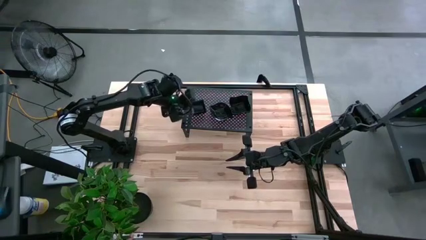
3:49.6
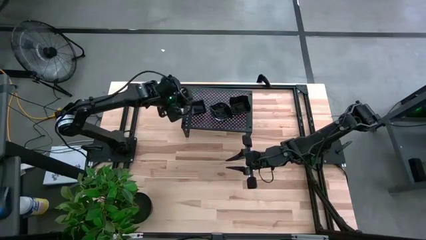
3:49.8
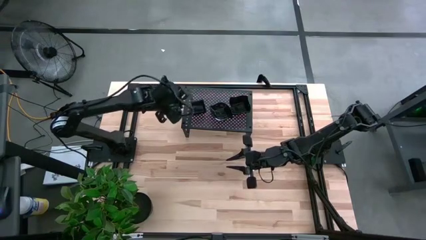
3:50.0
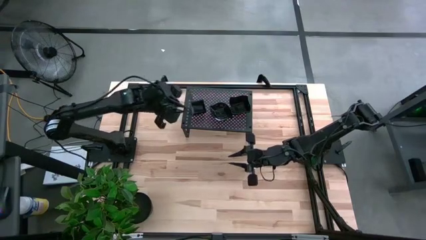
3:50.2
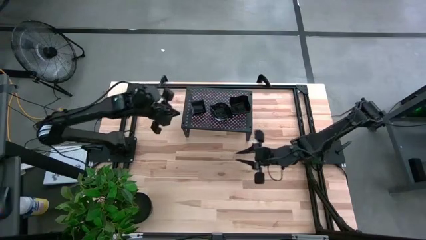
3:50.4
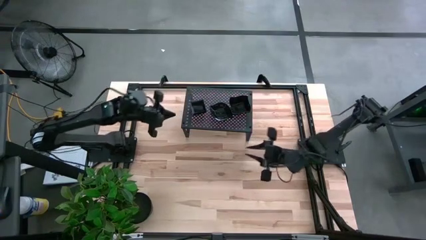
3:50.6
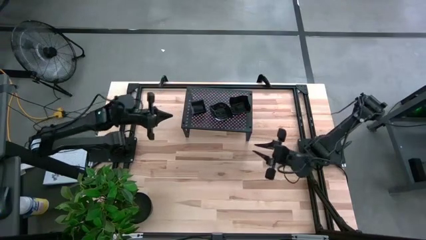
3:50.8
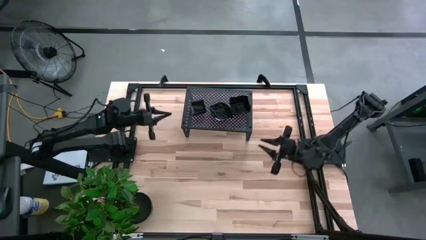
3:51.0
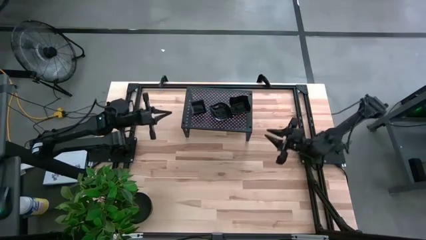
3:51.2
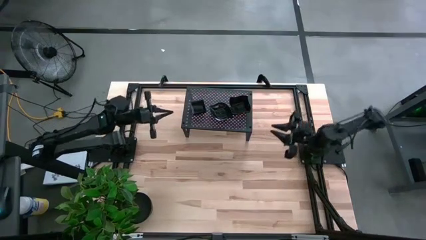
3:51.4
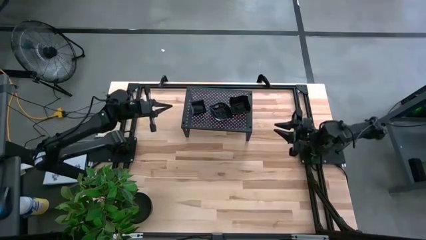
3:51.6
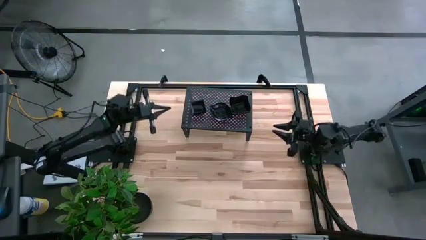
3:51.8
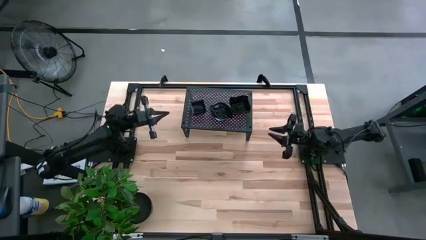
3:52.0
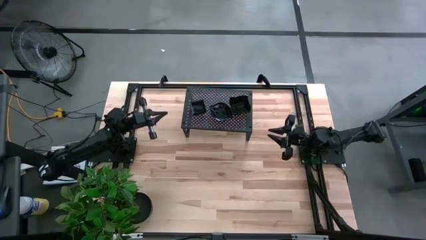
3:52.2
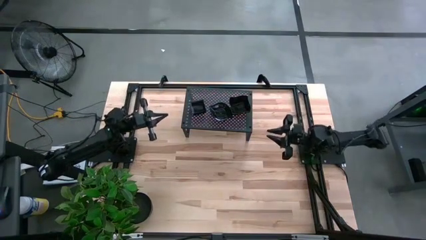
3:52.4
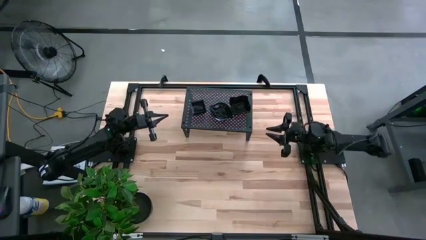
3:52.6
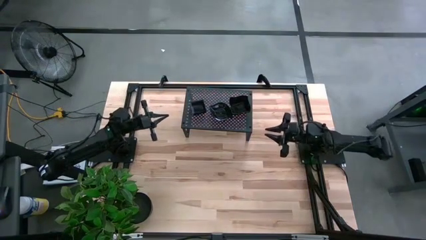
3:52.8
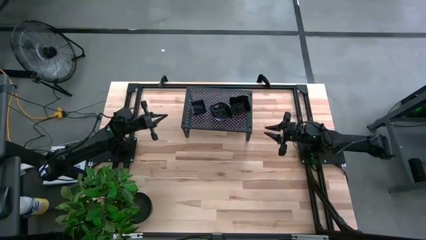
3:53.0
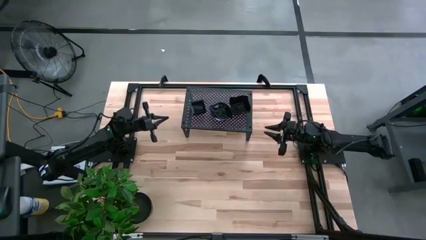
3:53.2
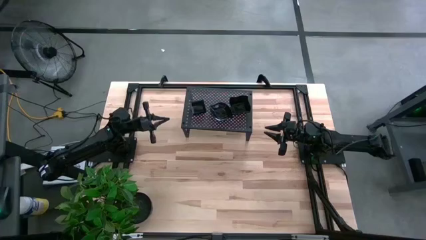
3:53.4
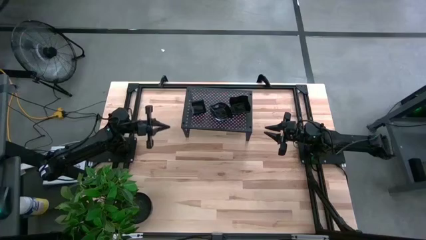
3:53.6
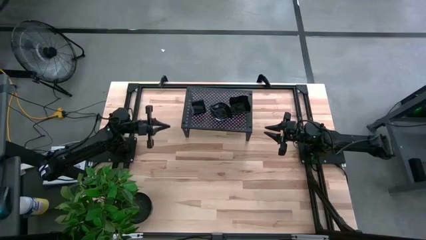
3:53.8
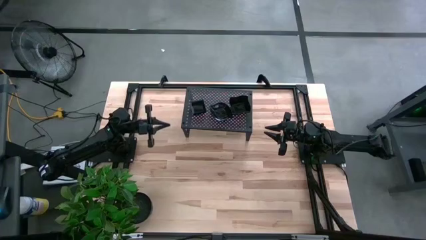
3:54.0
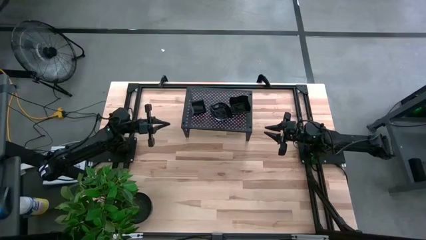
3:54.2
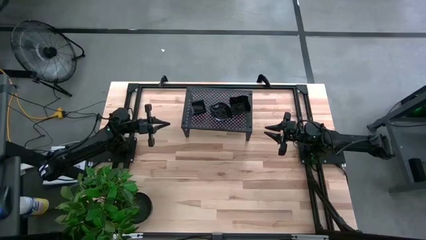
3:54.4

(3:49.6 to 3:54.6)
Task: Pick & Place Mini shaped plates
Return to Home Position

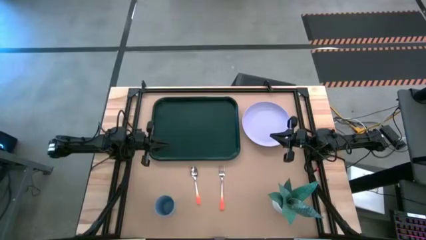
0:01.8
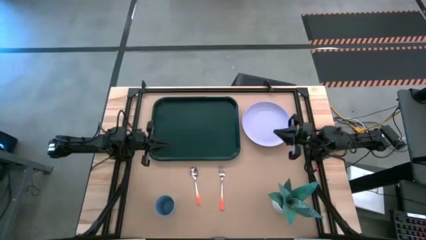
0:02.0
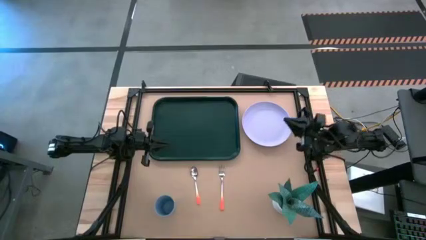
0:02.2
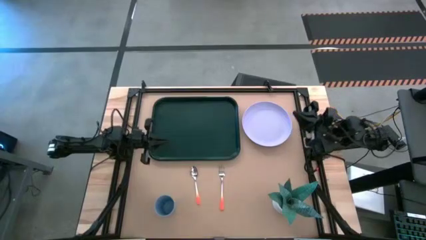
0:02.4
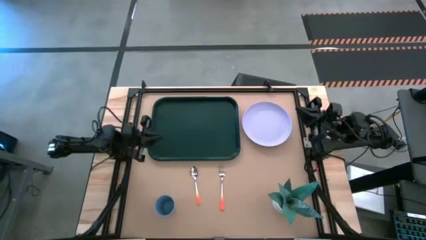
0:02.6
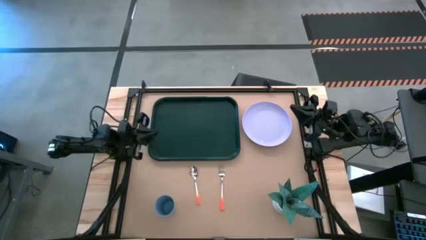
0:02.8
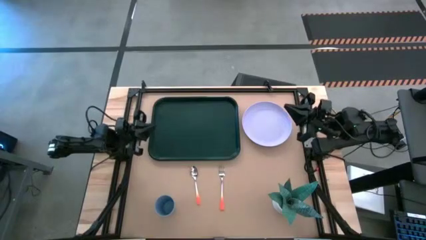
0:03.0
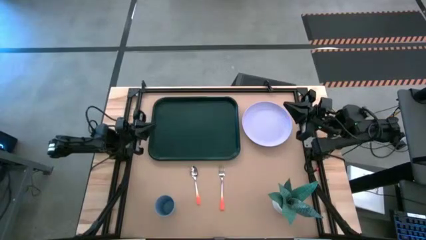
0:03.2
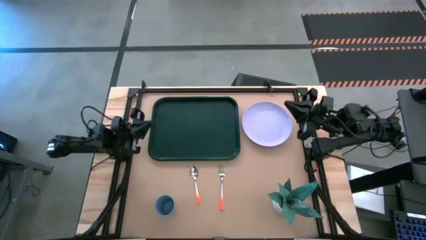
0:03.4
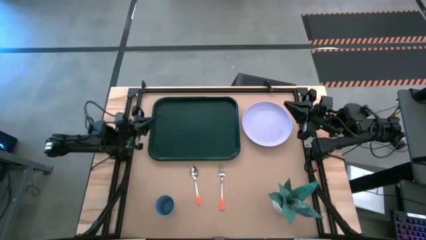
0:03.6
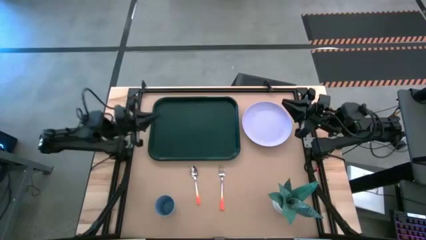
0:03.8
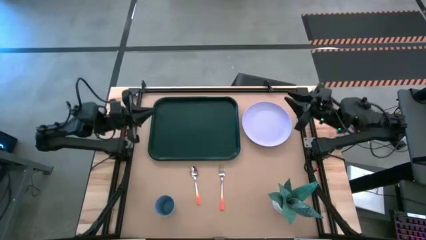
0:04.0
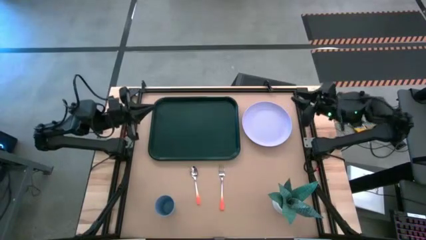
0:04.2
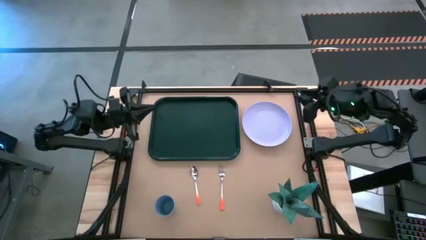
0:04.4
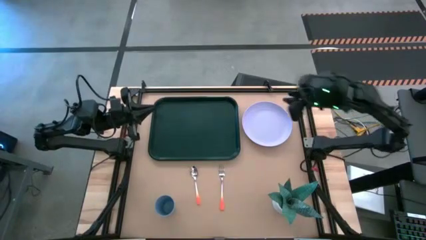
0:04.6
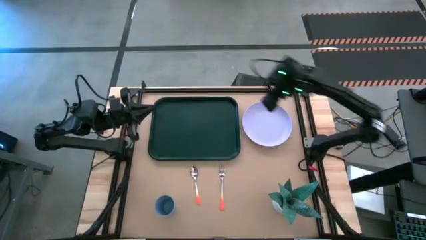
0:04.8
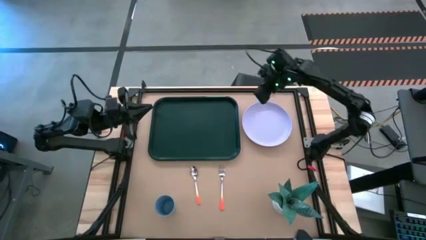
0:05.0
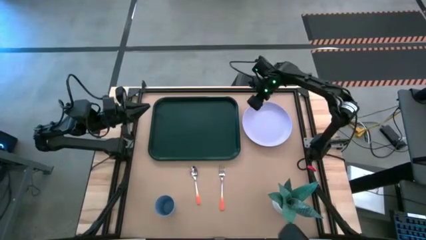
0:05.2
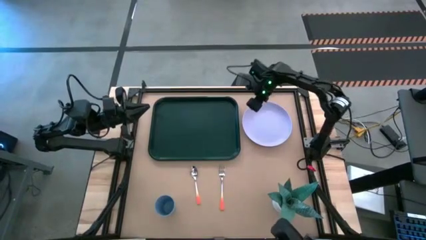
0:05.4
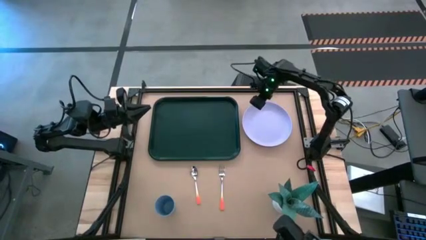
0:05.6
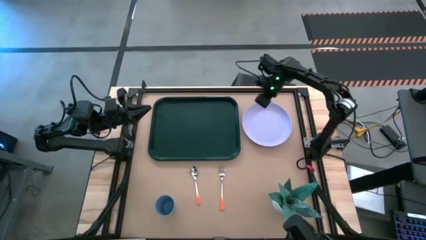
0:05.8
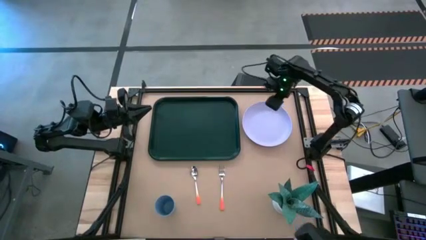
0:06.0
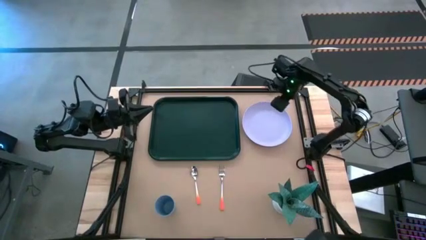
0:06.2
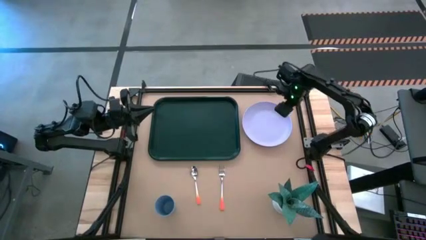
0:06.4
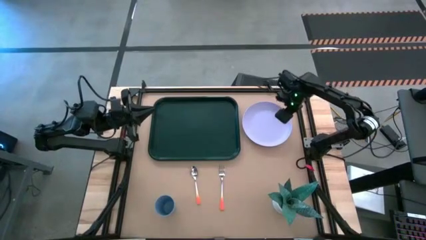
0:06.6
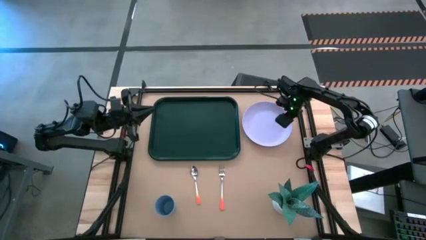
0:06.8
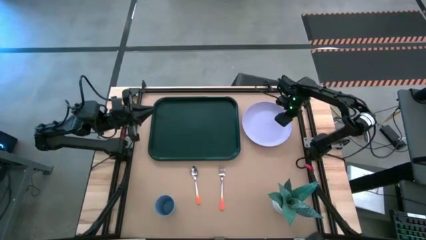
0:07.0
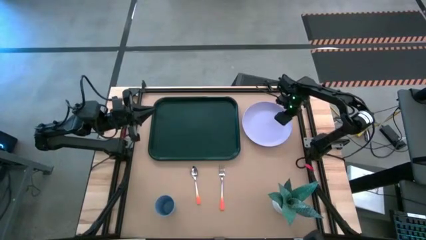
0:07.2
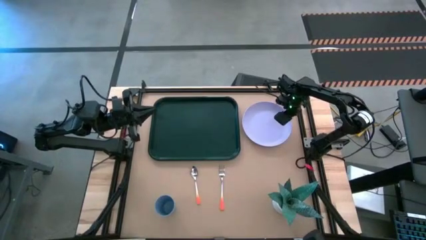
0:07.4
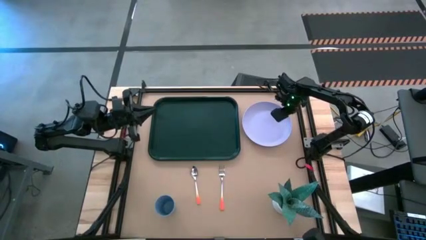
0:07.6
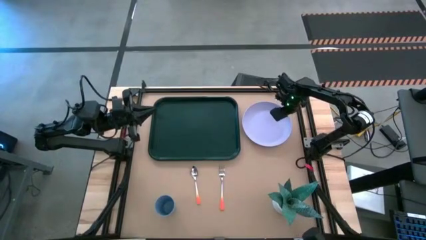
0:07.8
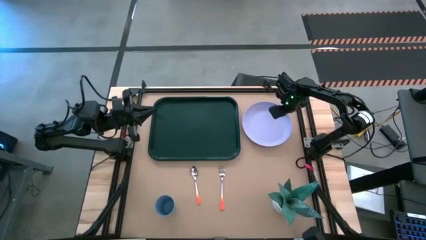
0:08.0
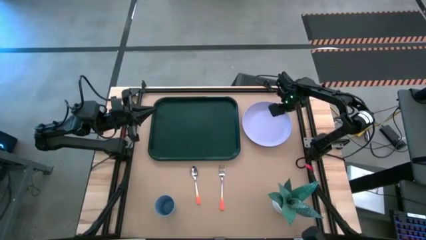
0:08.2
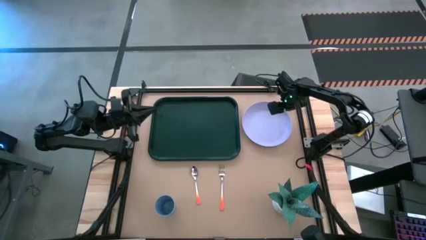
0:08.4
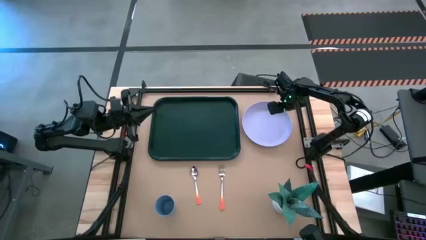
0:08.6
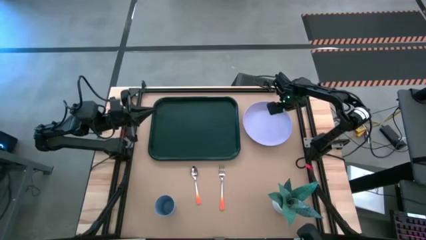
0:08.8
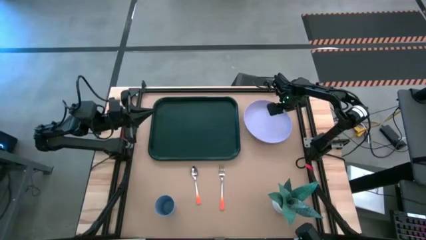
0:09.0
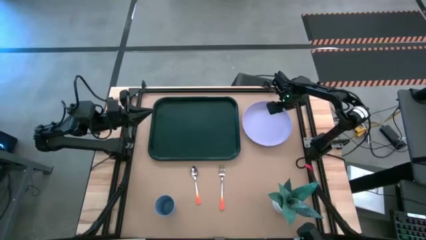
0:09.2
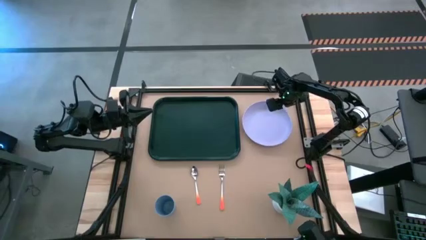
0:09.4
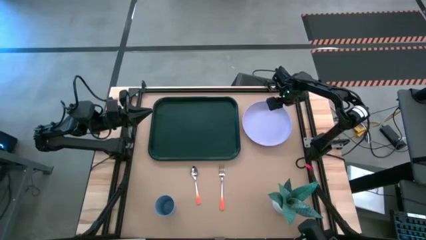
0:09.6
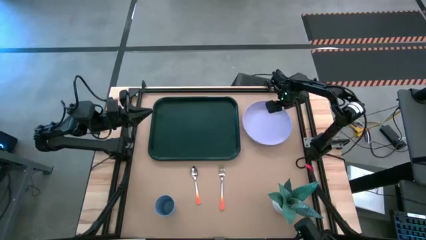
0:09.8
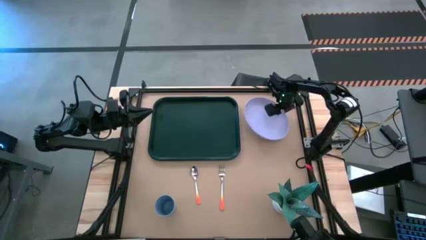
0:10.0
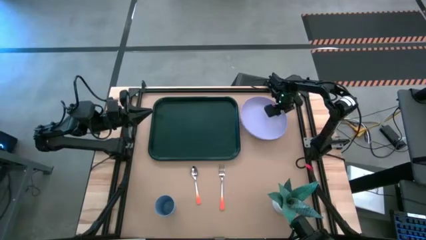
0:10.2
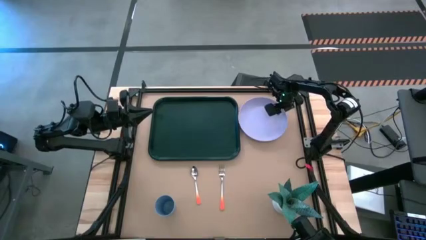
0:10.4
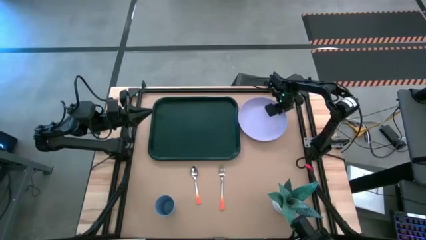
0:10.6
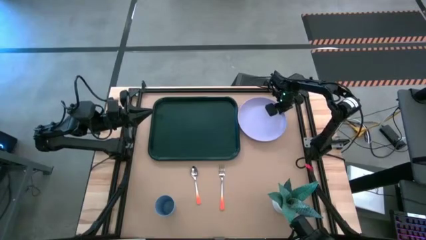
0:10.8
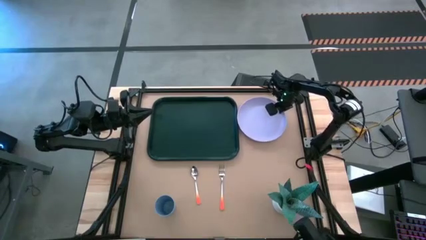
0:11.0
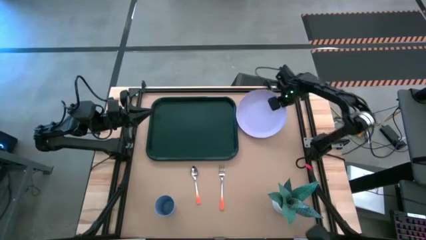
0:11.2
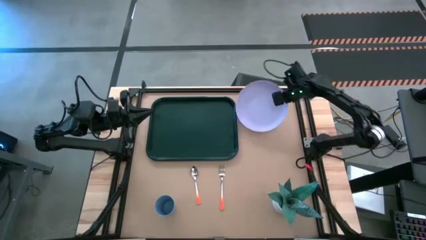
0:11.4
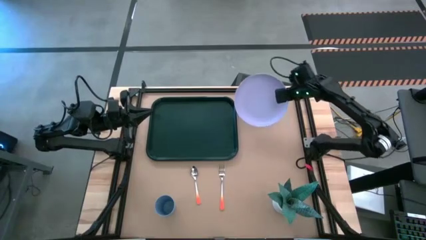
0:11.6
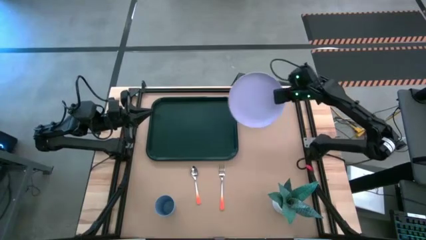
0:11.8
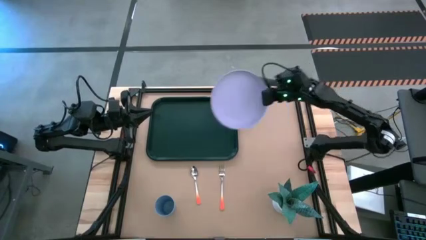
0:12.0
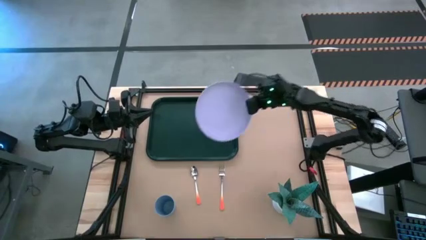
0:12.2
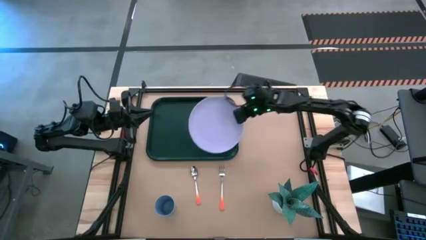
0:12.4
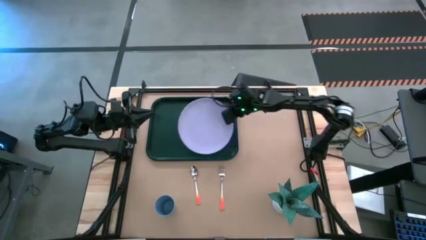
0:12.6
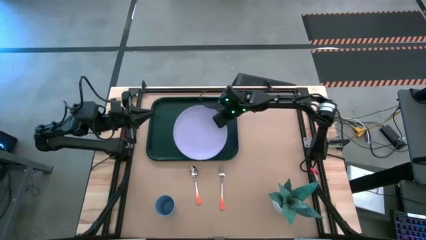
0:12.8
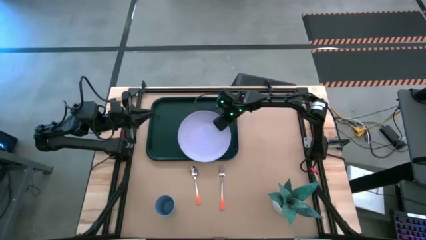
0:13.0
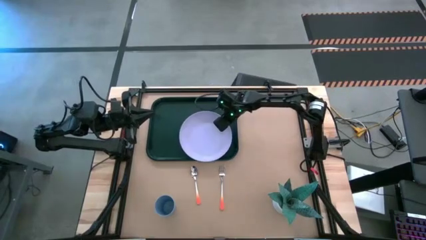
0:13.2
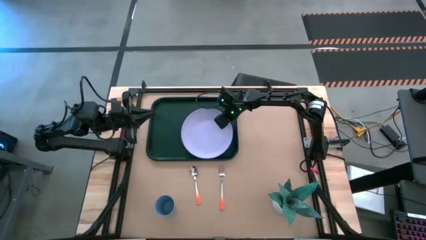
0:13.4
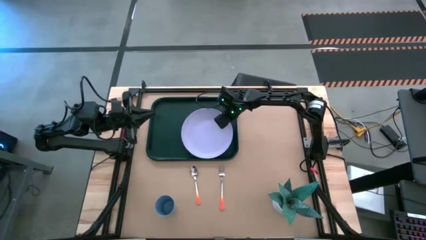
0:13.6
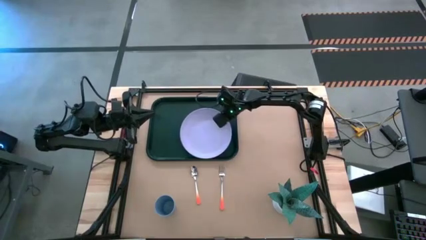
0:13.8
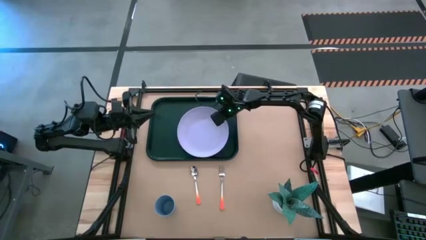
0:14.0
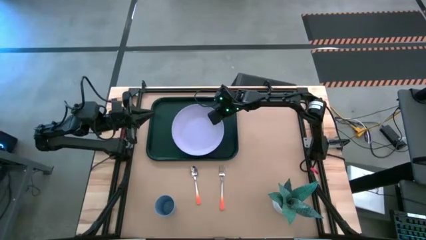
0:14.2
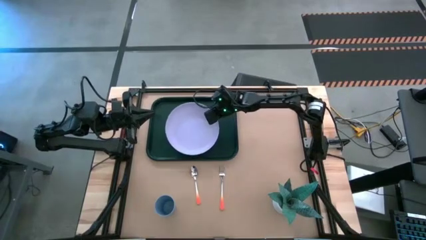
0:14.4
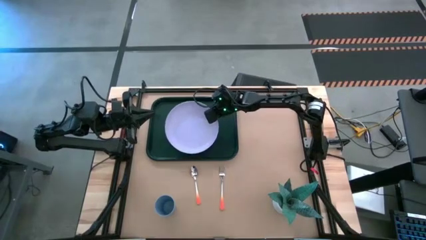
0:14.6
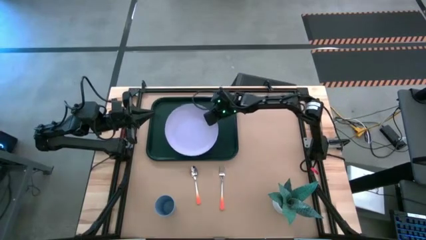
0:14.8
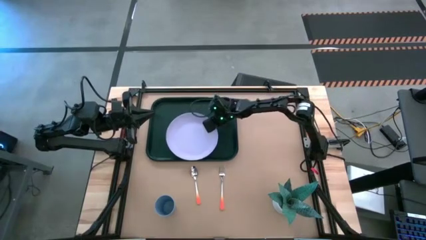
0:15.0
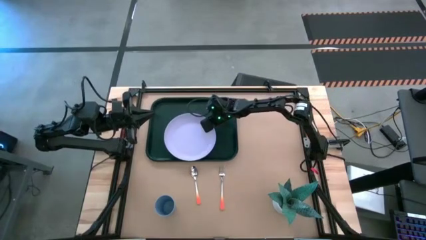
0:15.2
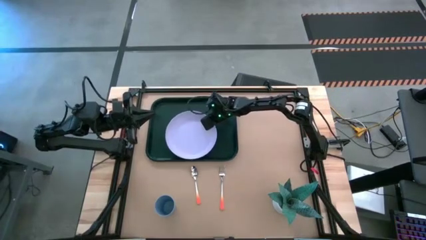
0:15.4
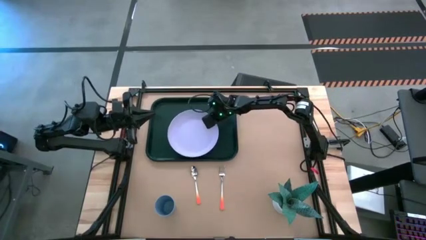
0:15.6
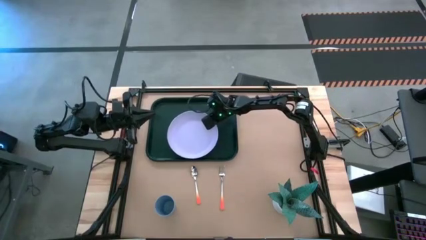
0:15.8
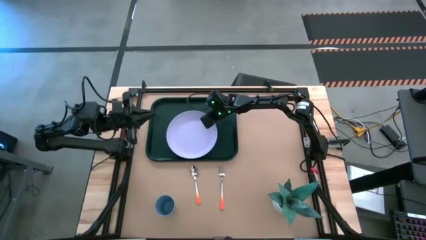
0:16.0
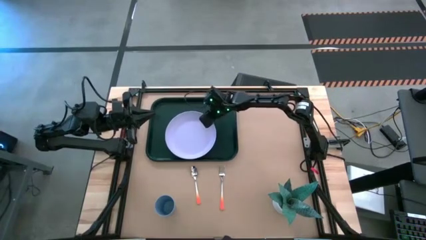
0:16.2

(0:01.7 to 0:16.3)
Task: Pick and place plate/cup/fork/spoon on tray
Put the white plate on the bottom middle of black serving tray
